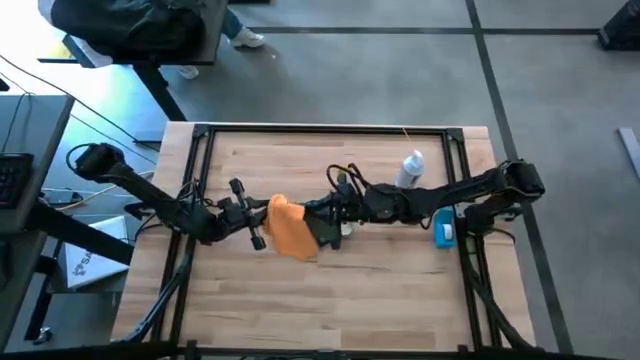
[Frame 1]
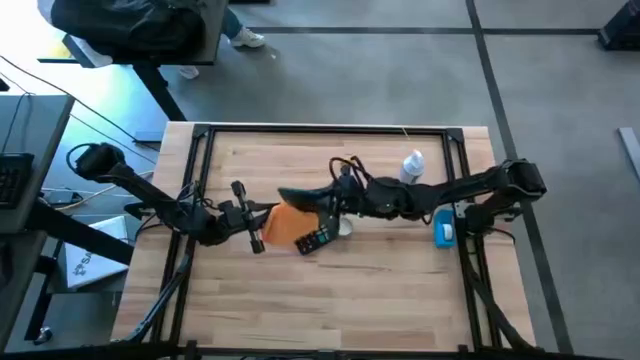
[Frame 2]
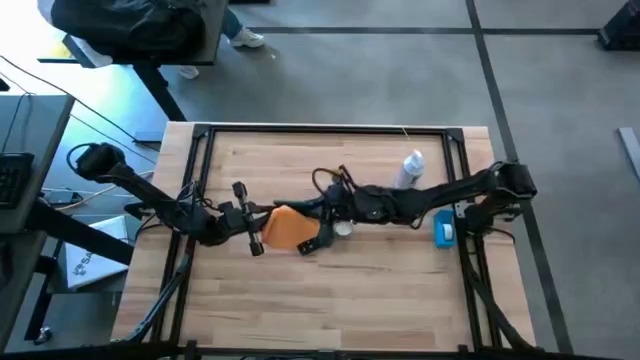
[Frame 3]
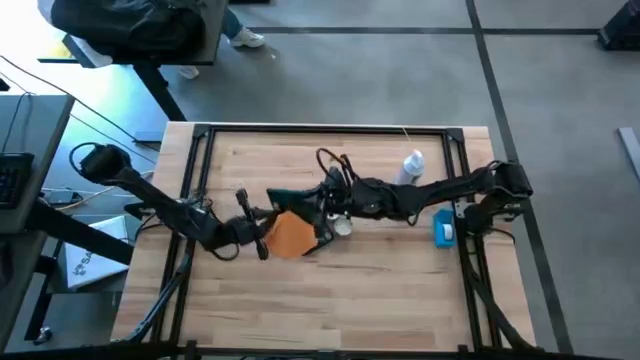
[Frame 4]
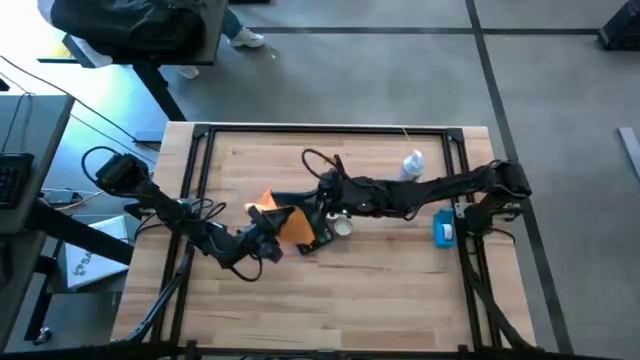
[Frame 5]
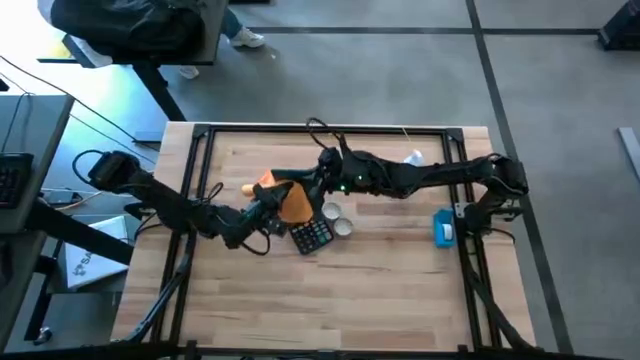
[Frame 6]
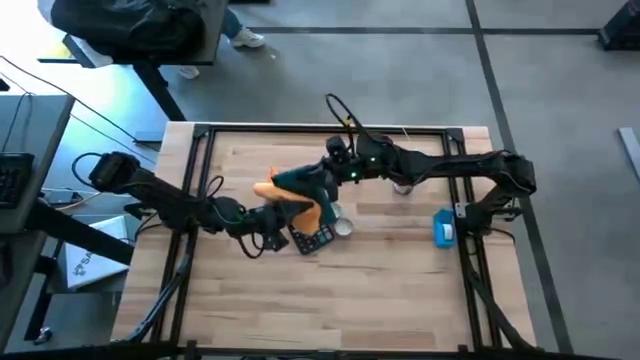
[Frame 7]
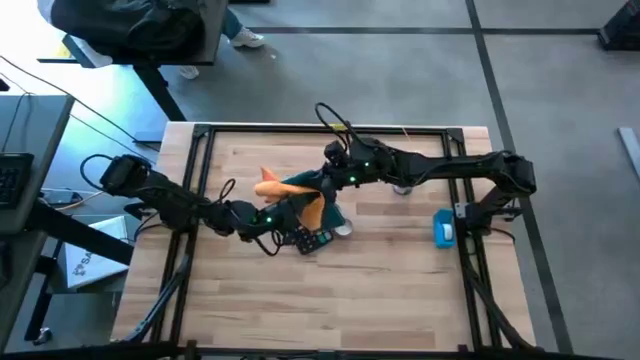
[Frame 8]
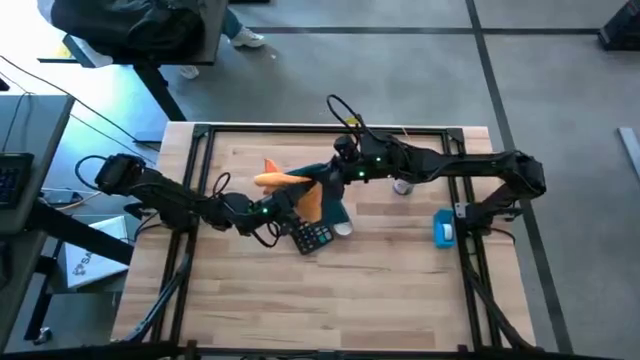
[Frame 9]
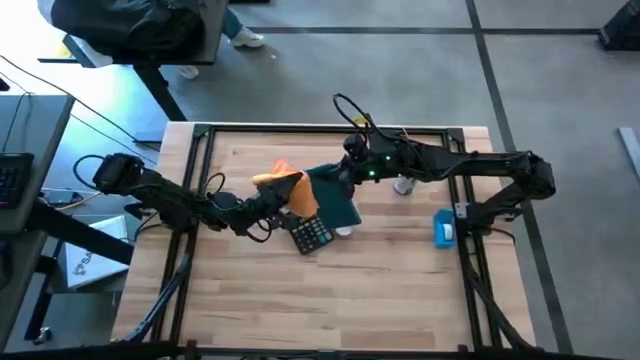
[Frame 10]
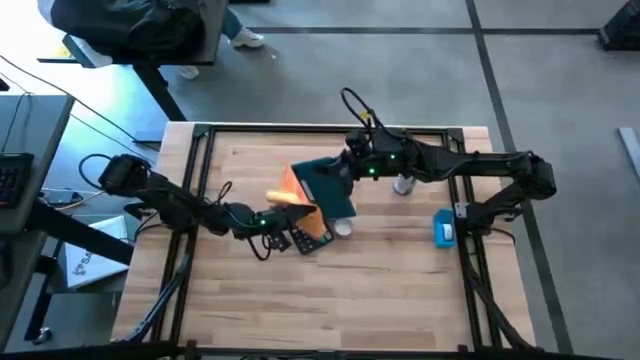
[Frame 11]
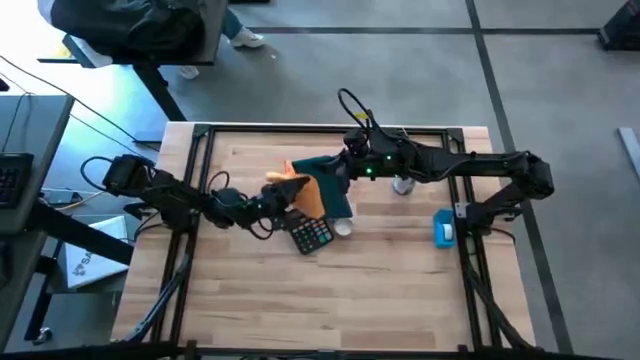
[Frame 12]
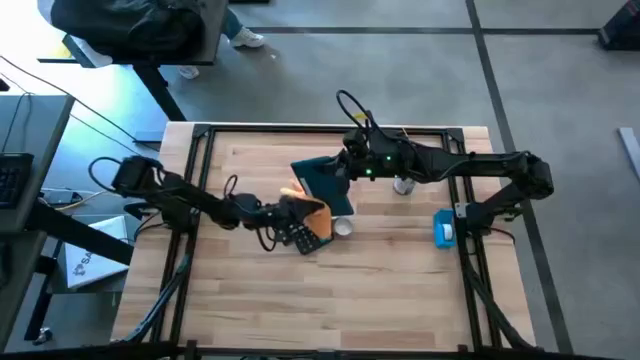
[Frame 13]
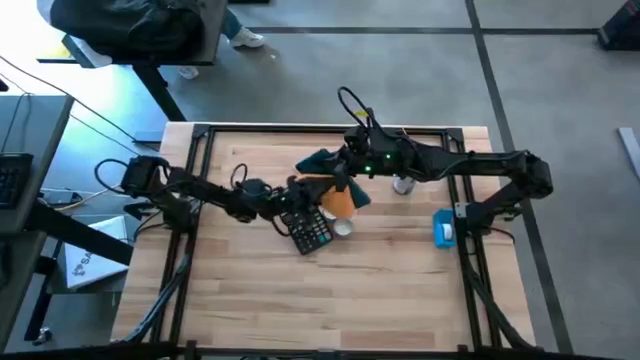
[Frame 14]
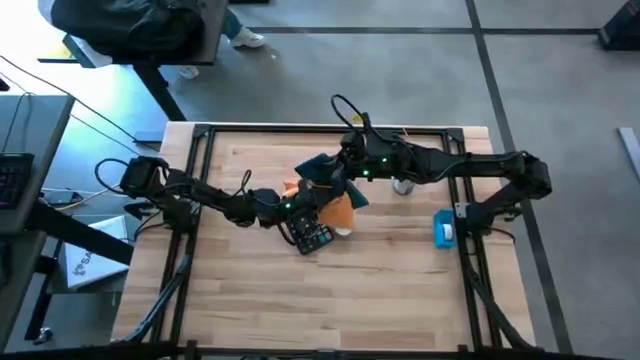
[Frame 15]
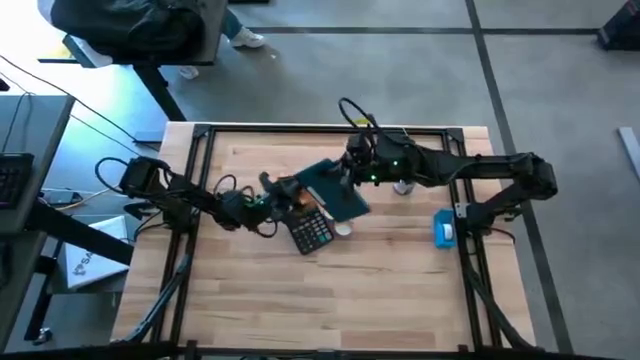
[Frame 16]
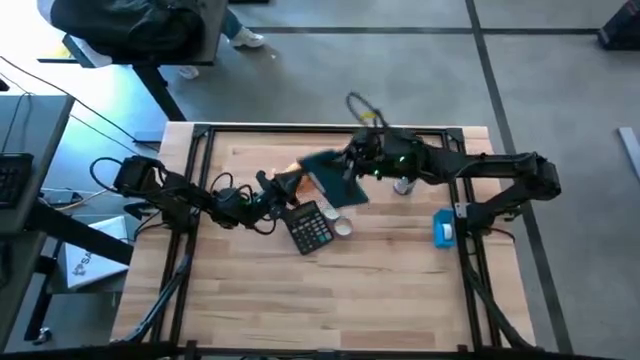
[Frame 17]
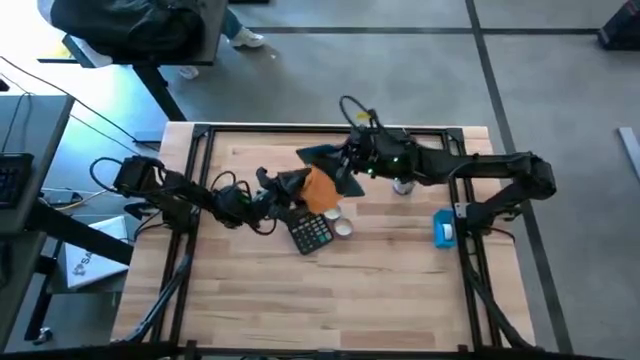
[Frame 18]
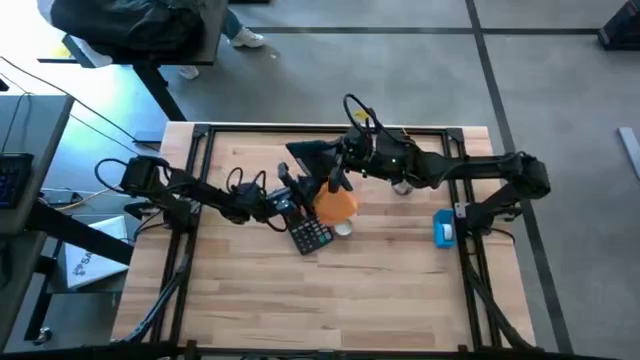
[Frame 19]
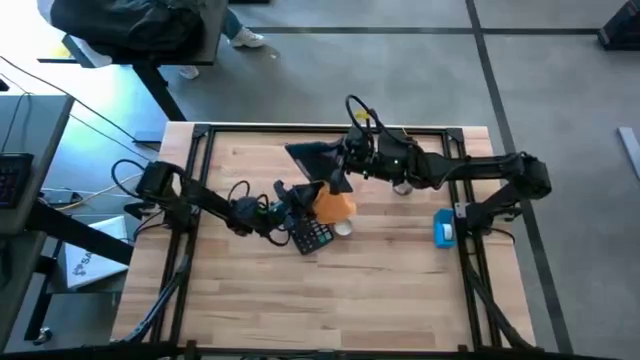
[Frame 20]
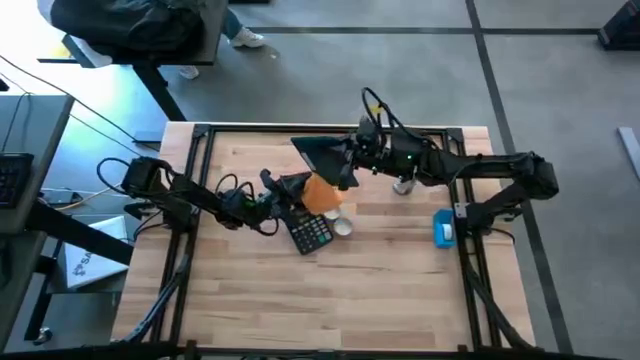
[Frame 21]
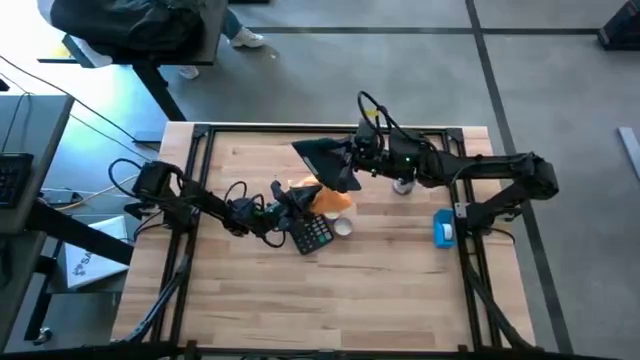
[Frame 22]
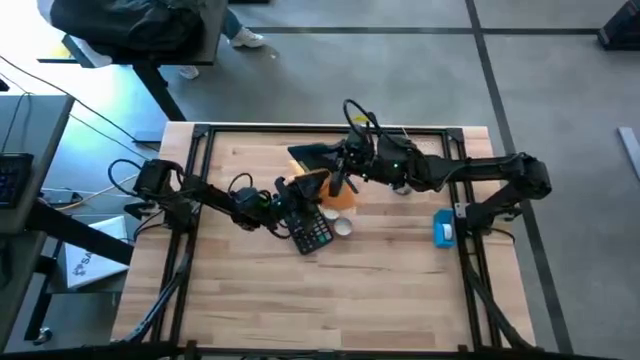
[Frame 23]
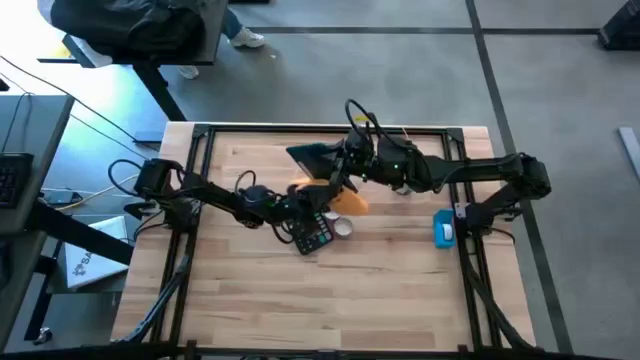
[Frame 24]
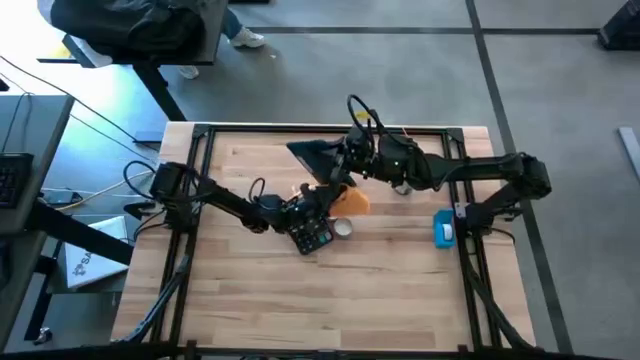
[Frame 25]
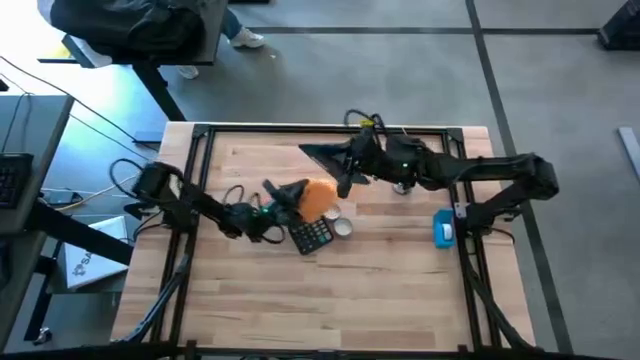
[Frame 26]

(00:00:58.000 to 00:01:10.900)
Task: Apply microfiber cloth
Wipe the back of the black tablet with the yellow microfiber cloth

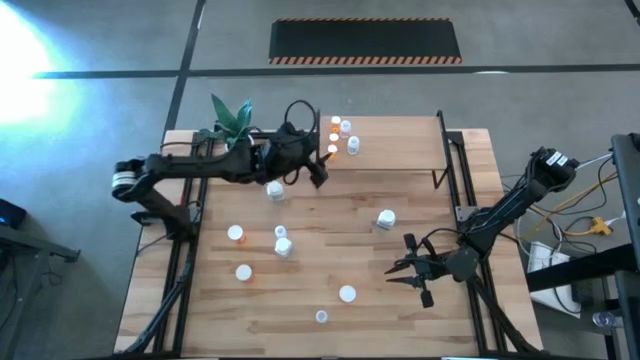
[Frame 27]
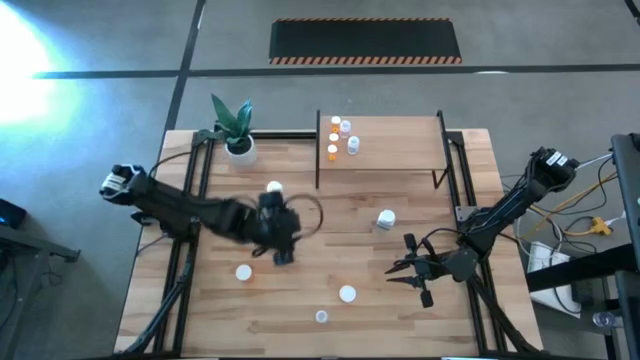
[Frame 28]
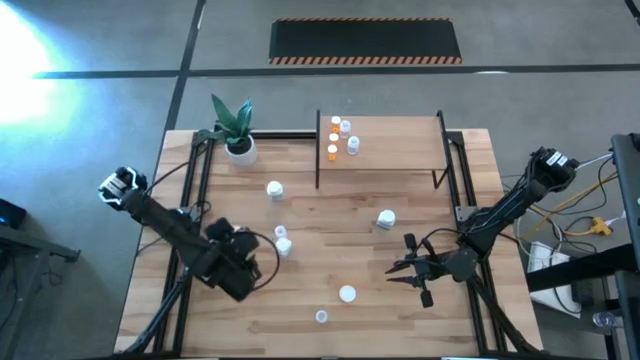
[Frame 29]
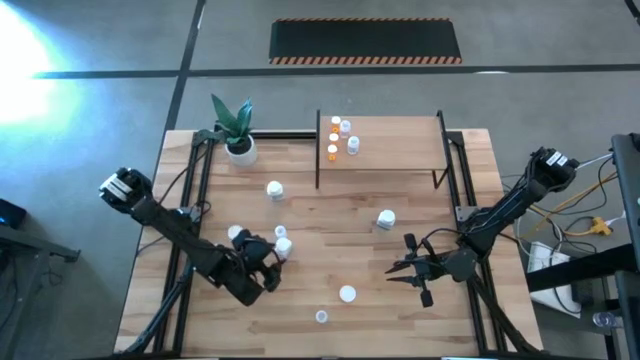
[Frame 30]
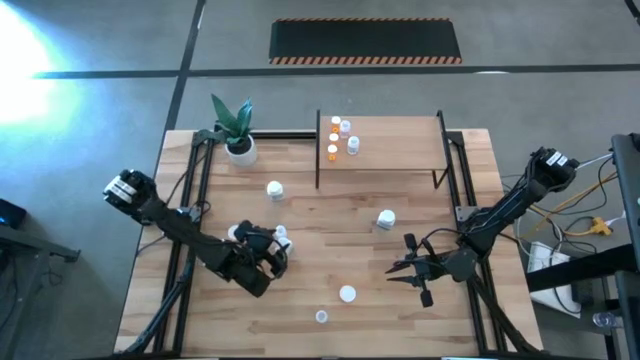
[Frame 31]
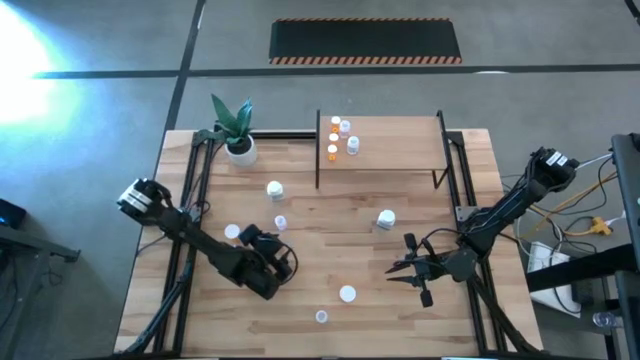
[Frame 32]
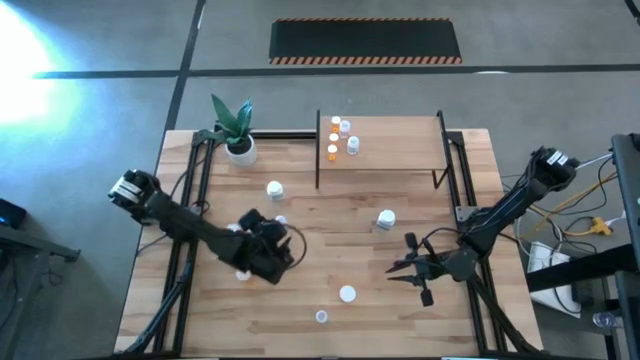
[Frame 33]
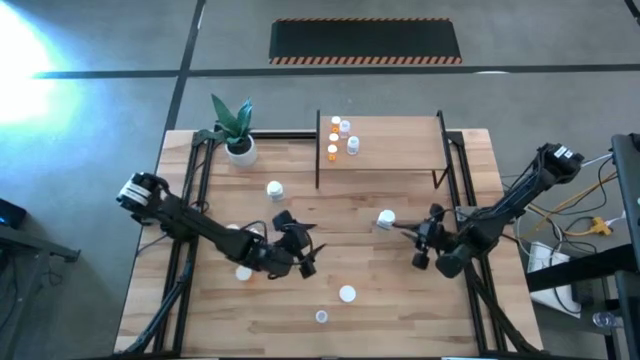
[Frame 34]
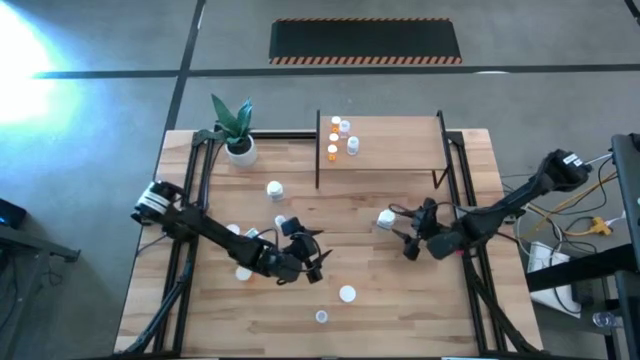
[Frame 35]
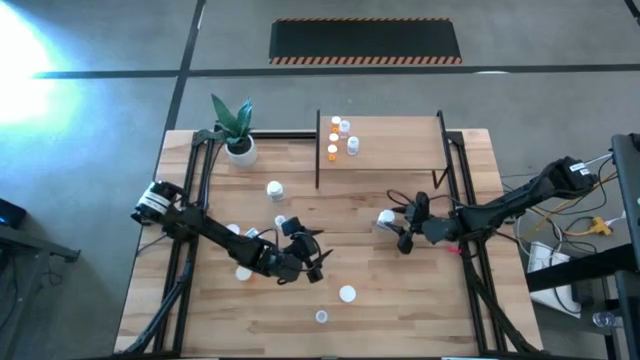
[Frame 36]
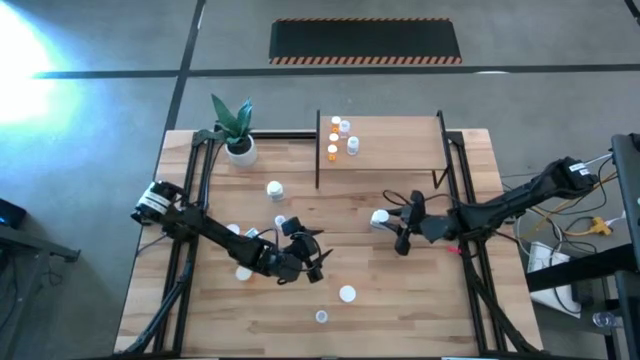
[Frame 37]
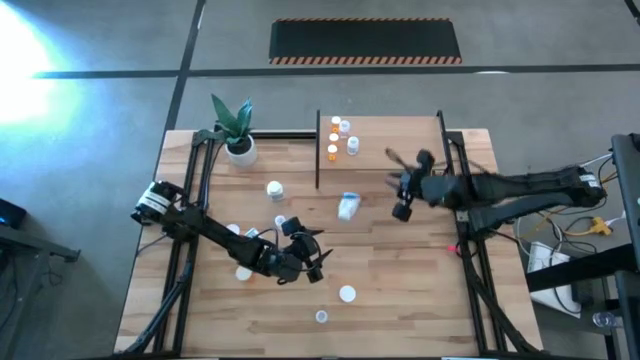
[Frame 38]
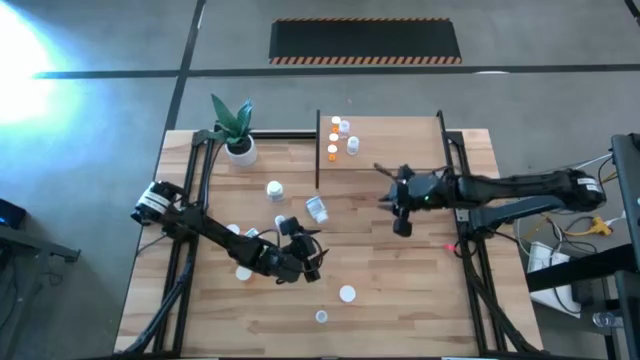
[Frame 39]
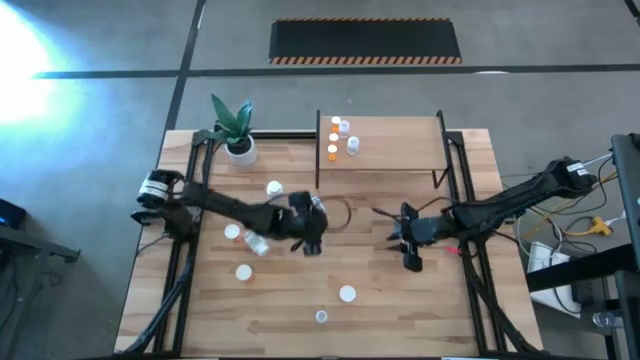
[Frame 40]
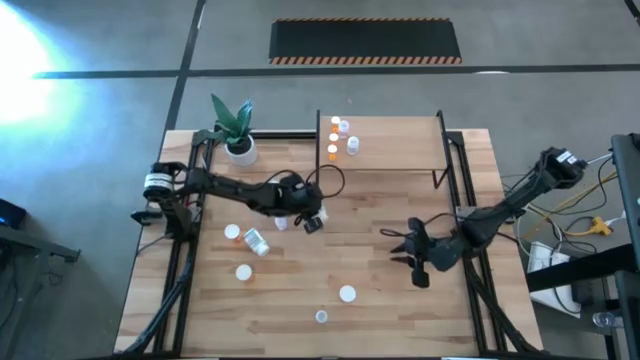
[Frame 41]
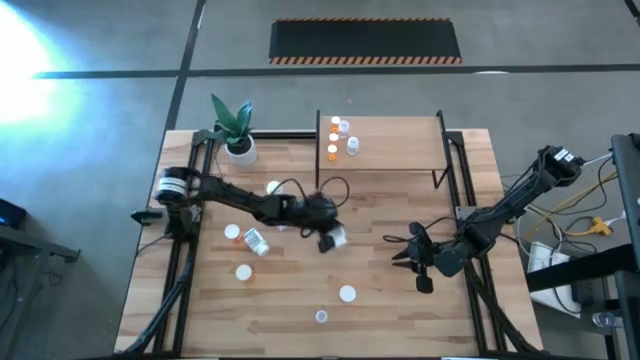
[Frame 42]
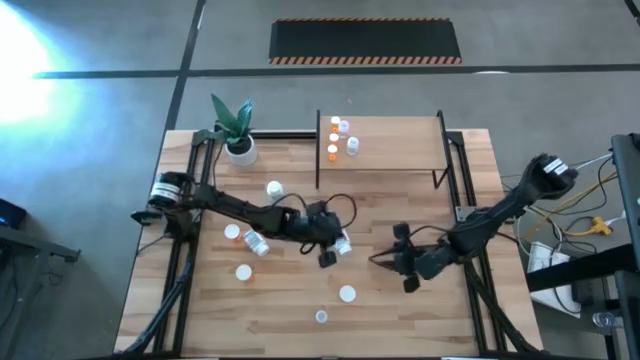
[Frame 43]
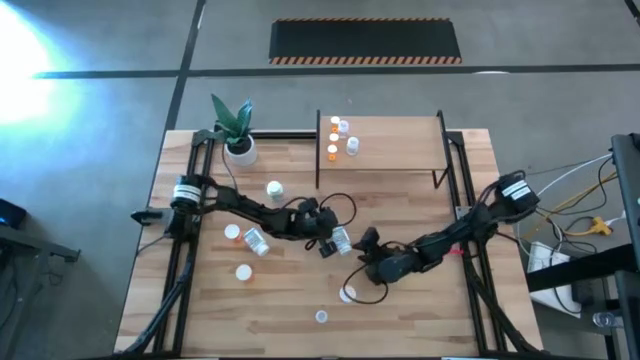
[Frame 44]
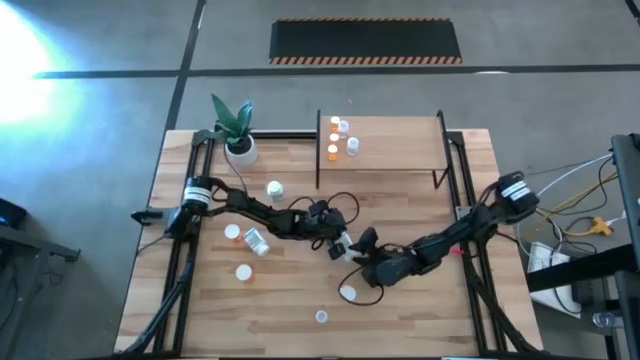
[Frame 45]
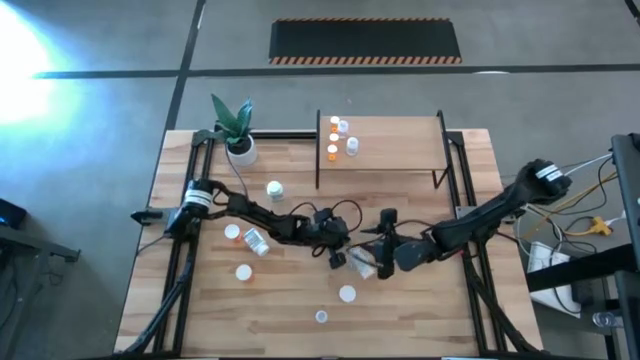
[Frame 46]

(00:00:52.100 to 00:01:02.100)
Task: Pick and place medicine bottles onto shelf by color
Put the white pill bottle on the shelf
